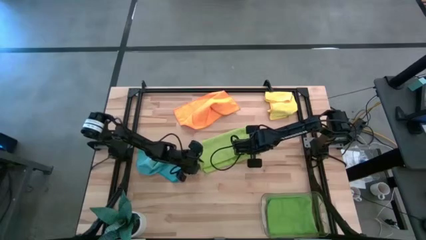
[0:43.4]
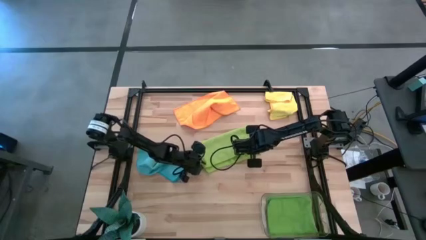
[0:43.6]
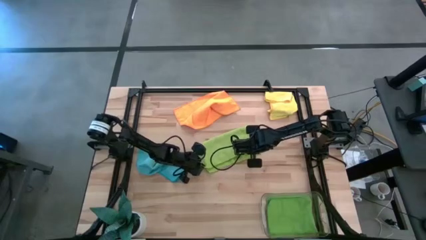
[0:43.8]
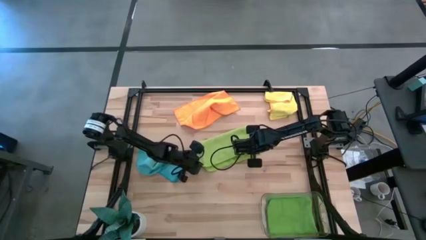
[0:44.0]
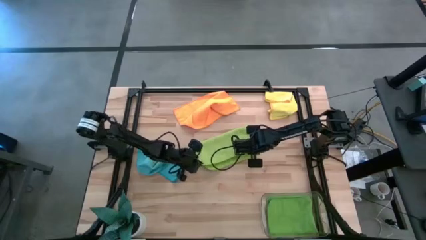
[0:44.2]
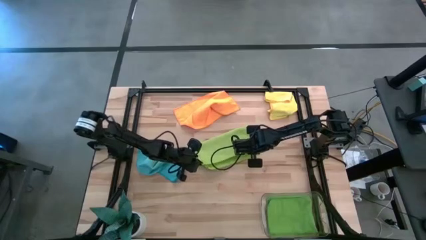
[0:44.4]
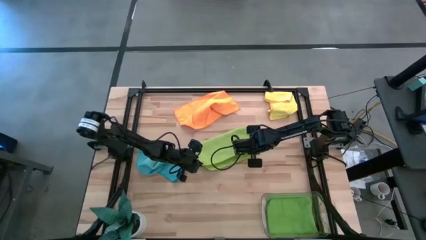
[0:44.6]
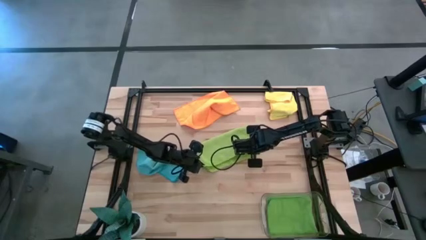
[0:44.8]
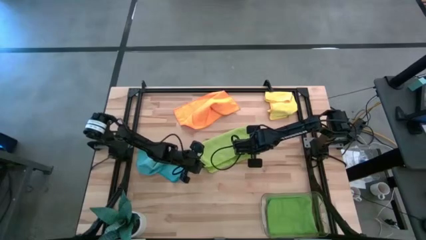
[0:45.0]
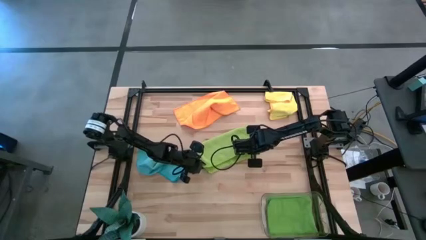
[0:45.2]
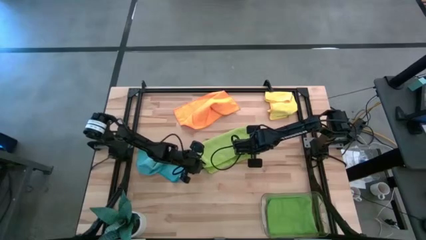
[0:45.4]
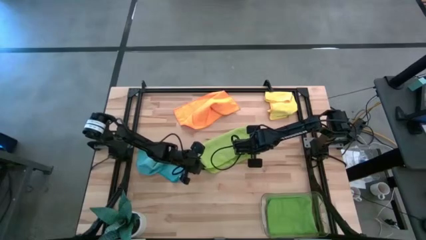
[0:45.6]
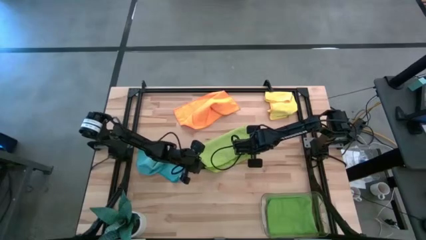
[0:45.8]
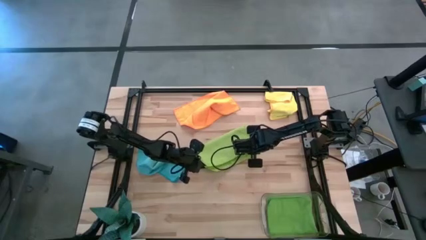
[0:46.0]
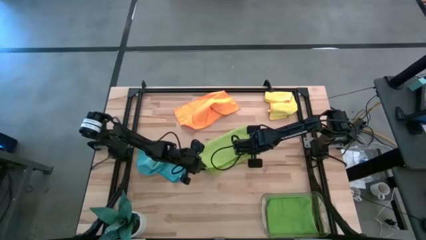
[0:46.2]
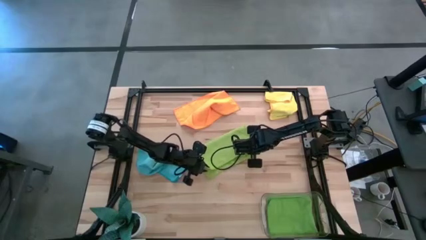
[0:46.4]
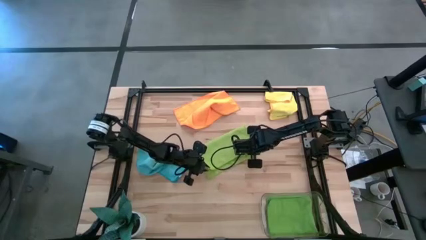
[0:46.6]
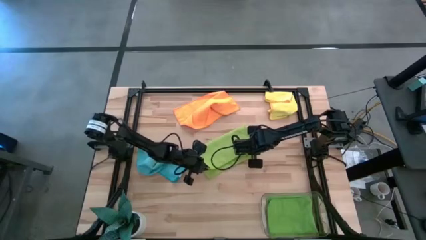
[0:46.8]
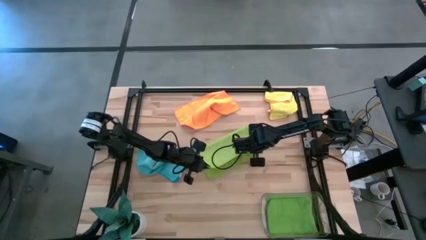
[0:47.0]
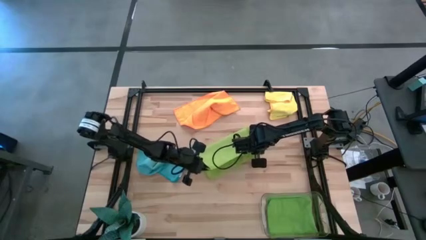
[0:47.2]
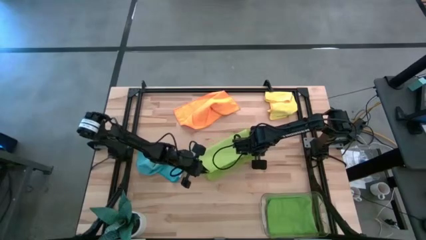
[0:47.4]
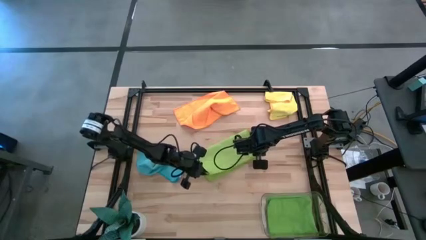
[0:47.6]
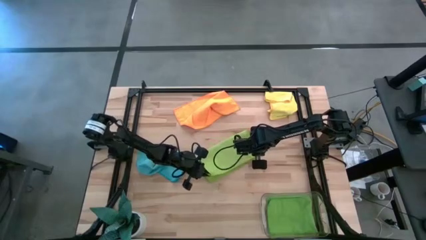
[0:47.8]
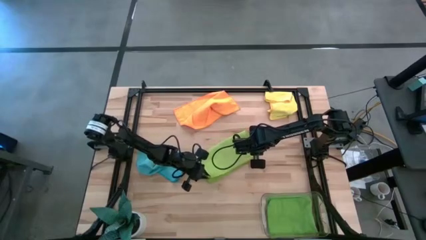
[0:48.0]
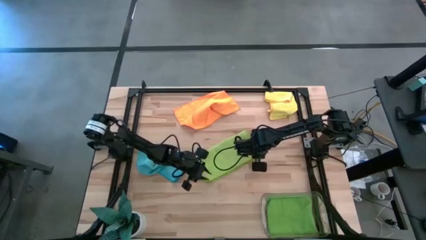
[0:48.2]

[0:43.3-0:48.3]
Task: Fold microfiber towels
Fold the light green microfiber towel

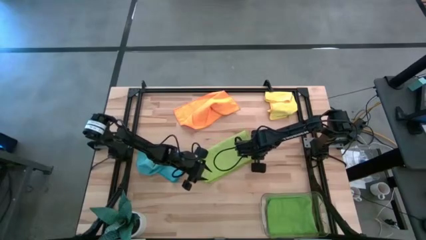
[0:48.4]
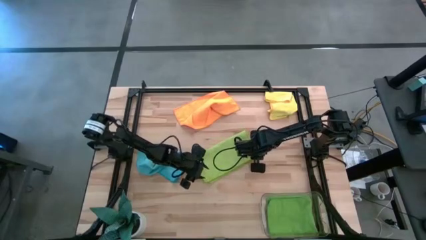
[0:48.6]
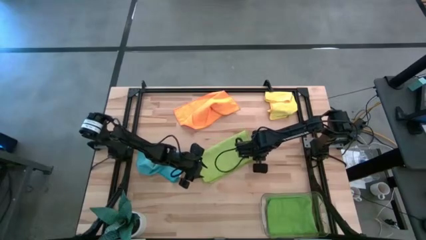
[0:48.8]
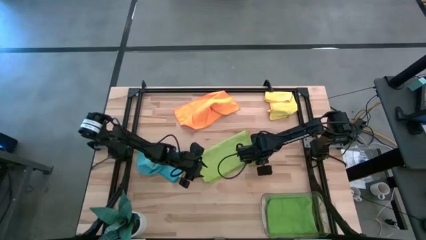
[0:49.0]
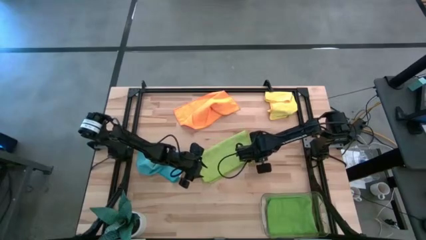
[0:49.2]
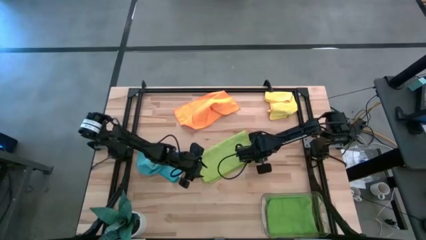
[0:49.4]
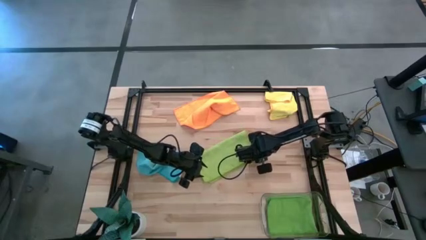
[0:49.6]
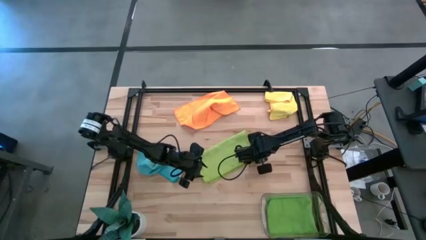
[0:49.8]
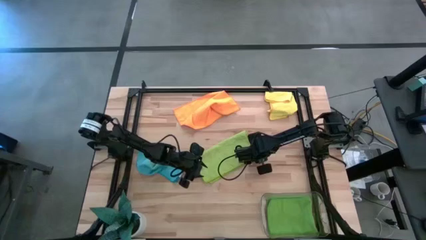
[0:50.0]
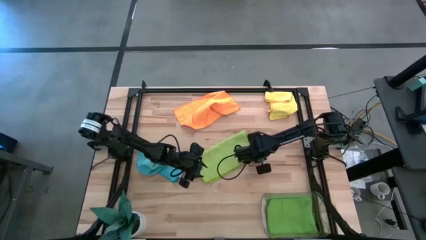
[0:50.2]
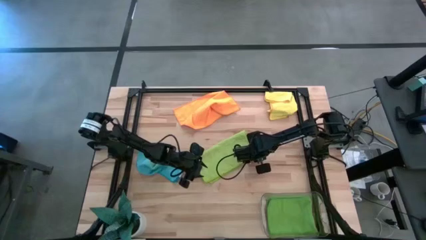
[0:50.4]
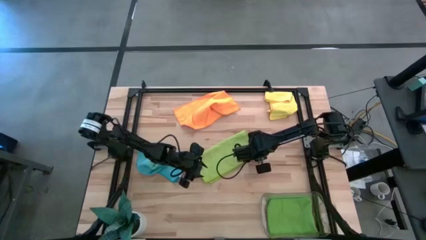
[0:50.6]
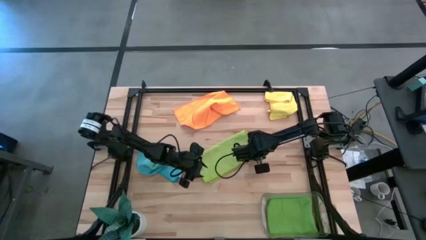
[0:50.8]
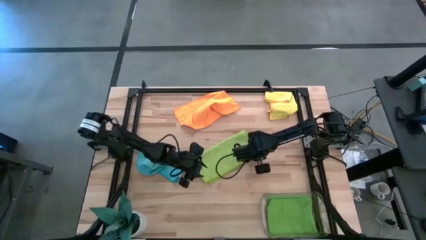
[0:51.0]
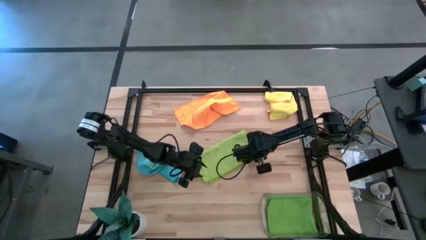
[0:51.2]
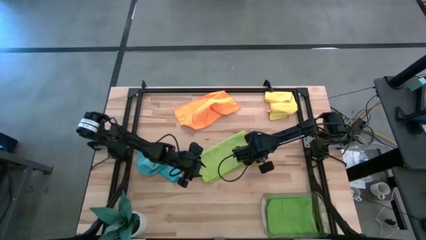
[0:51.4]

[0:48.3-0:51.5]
Fold the light green microfiber towel

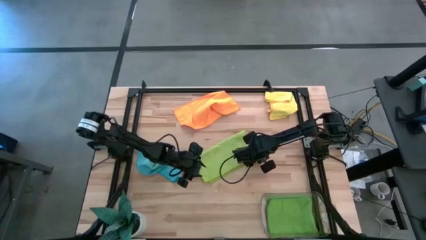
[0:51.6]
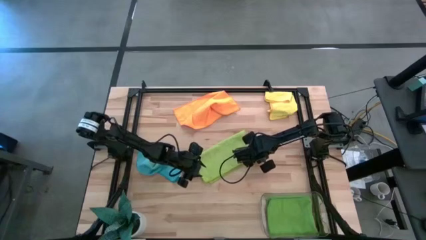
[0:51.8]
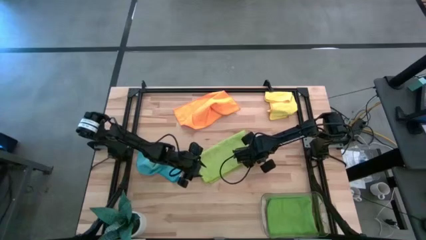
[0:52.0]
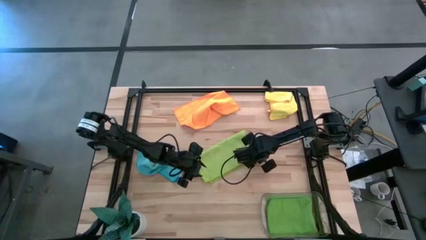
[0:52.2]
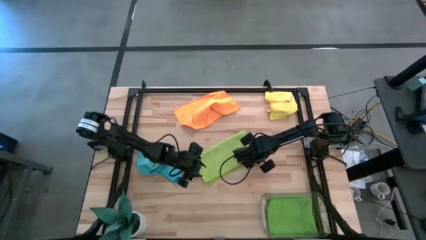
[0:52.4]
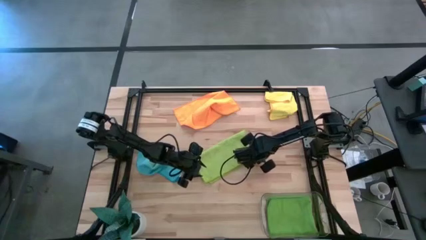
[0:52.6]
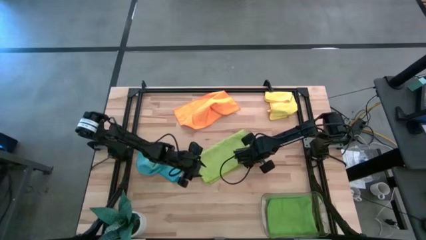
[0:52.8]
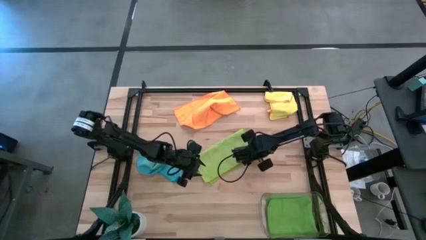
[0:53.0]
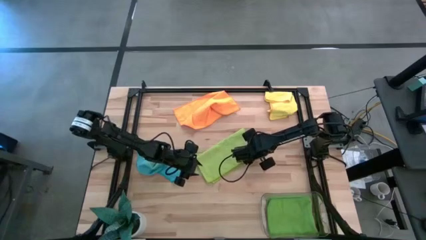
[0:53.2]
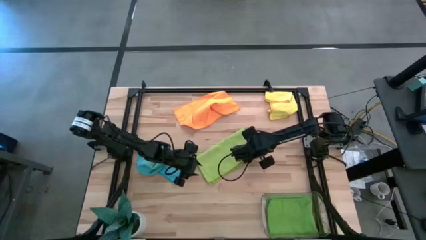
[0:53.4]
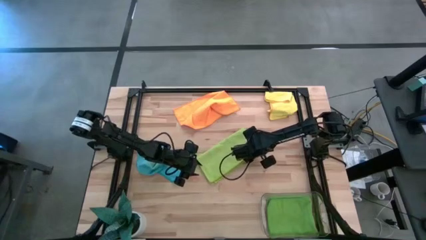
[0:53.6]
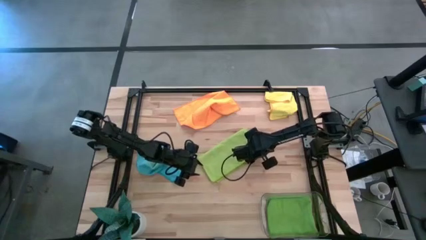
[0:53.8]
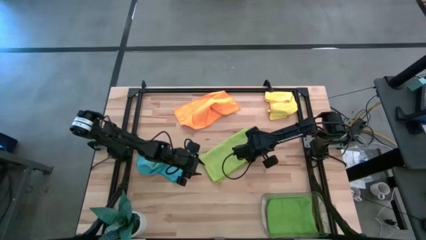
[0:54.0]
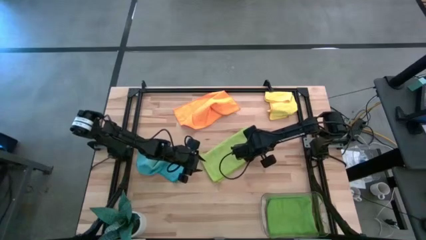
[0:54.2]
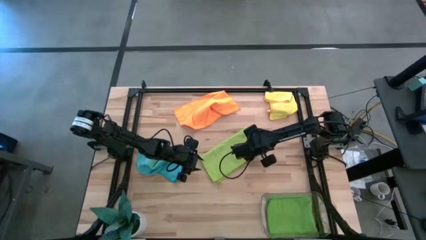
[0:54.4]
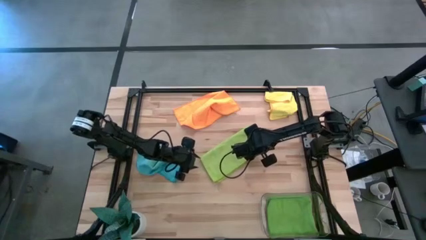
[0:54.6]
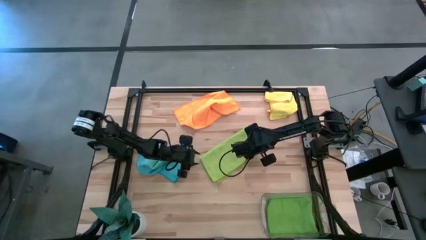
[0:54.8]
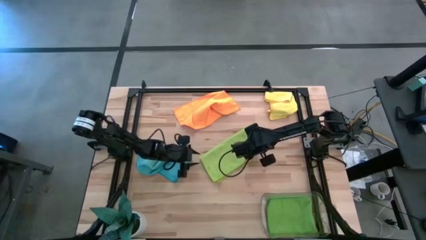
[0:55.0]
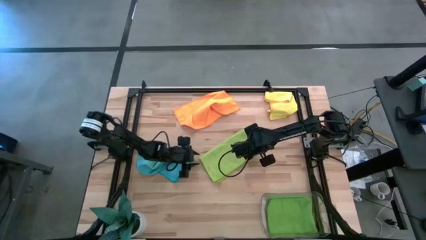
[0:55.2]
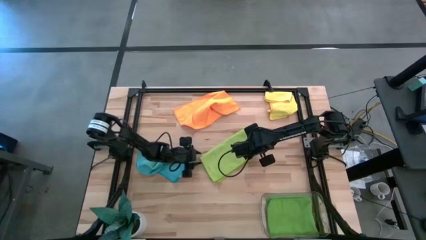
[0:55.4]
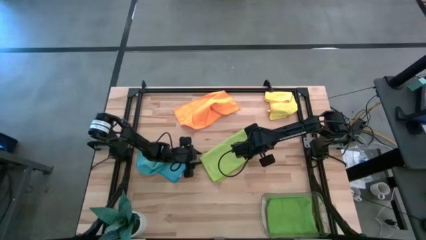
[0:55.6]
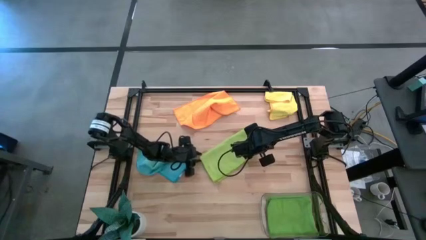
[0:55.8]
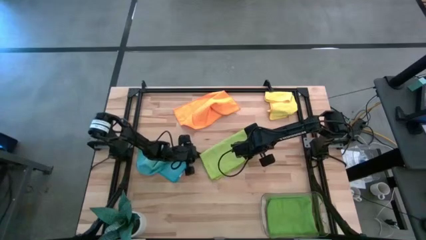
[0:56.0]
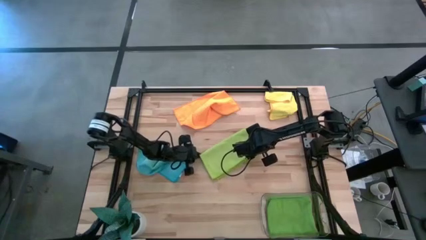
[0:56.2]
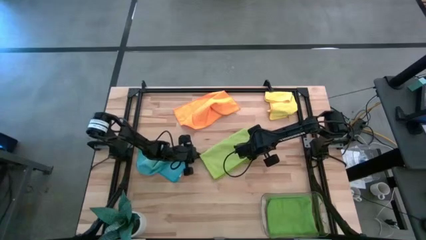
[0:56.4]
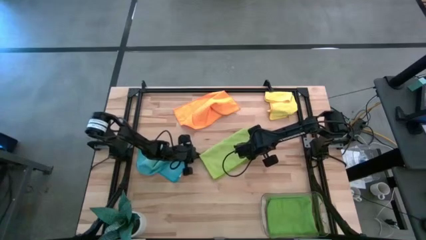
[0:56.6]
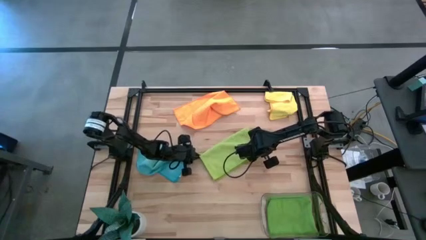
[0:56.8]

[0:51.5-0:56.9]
Fold the light green microfiber towel
